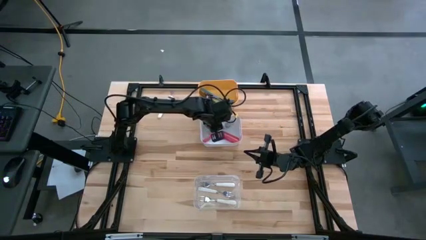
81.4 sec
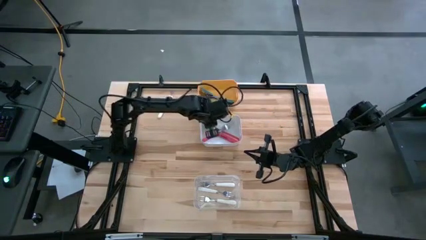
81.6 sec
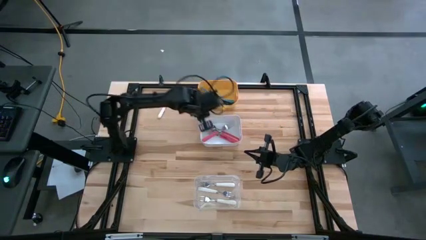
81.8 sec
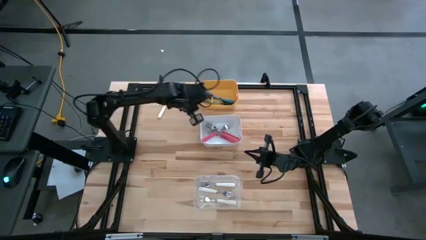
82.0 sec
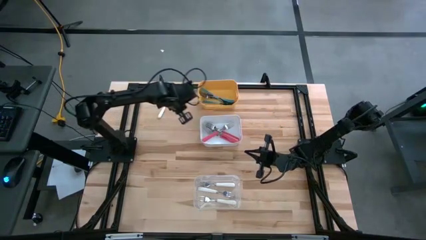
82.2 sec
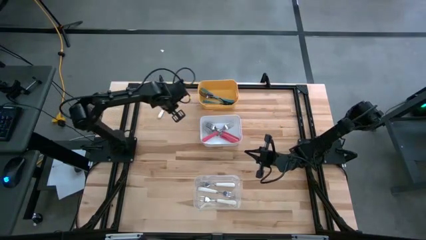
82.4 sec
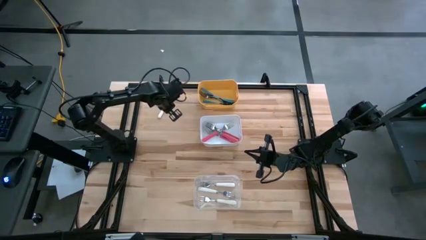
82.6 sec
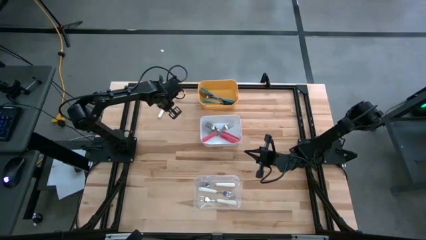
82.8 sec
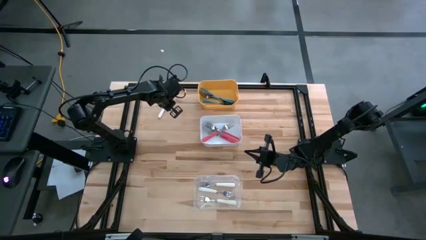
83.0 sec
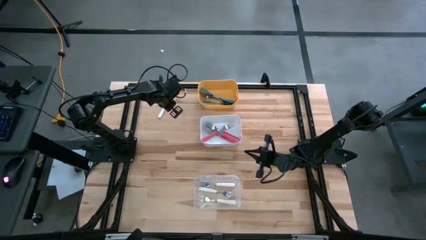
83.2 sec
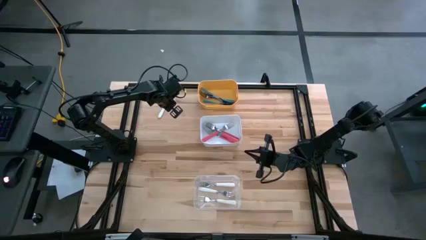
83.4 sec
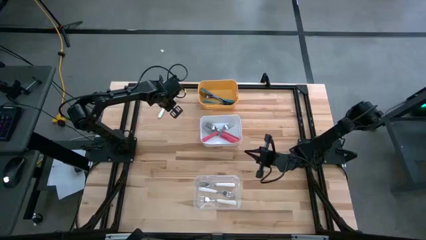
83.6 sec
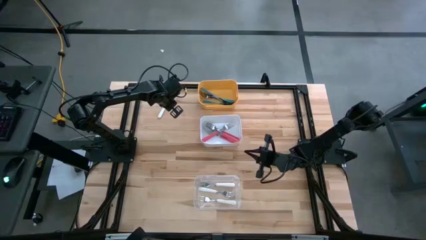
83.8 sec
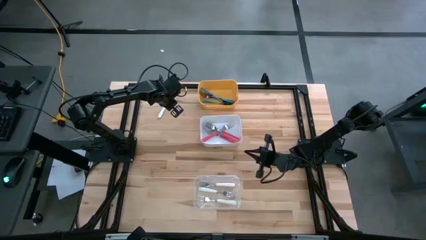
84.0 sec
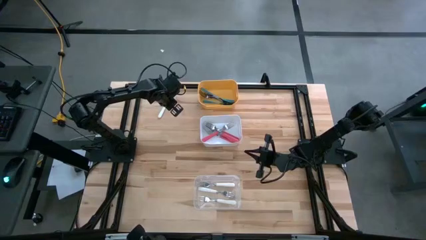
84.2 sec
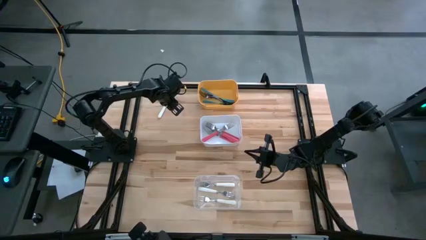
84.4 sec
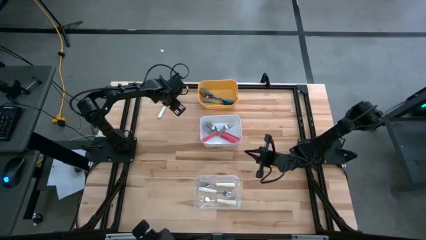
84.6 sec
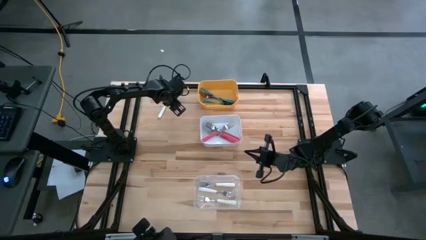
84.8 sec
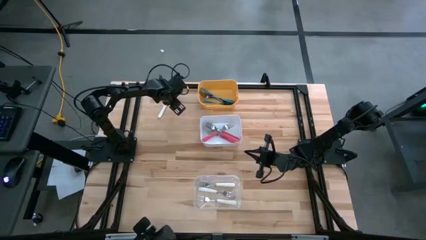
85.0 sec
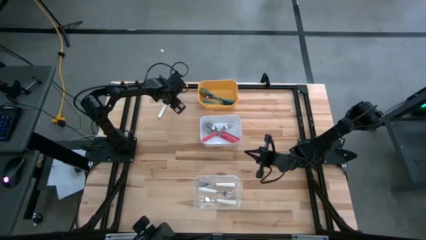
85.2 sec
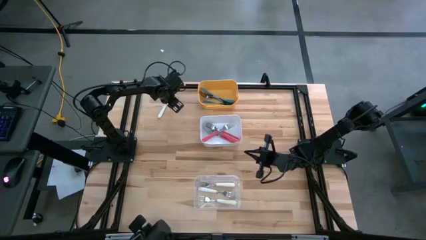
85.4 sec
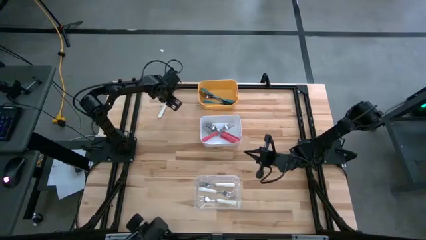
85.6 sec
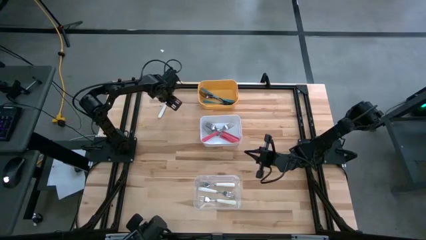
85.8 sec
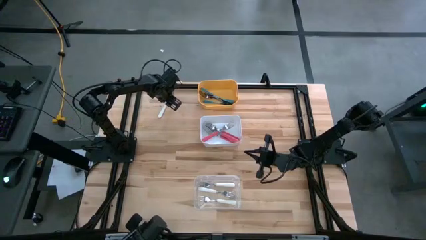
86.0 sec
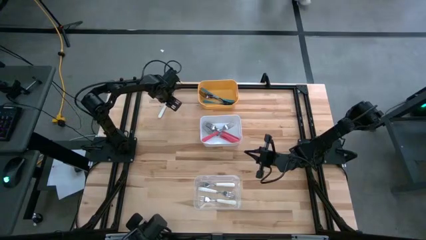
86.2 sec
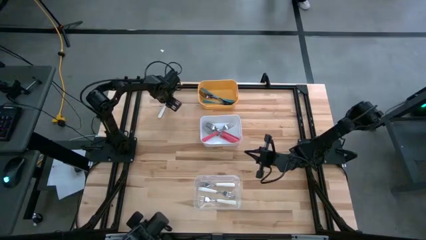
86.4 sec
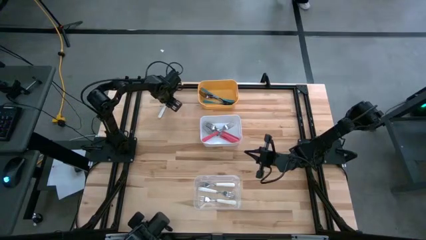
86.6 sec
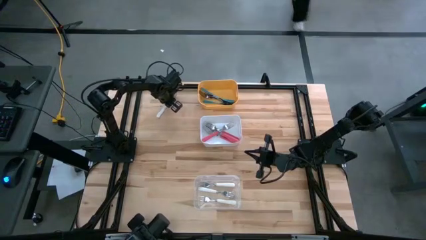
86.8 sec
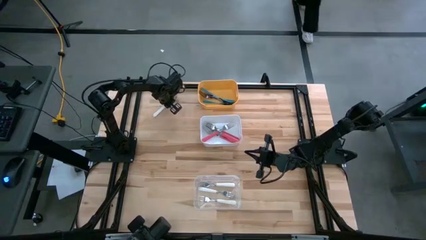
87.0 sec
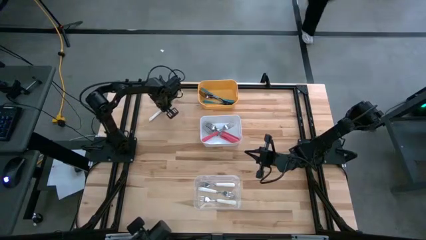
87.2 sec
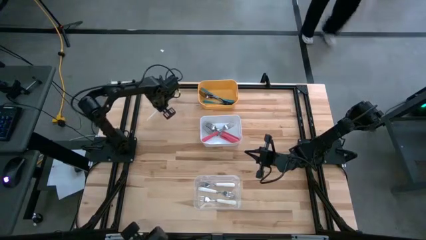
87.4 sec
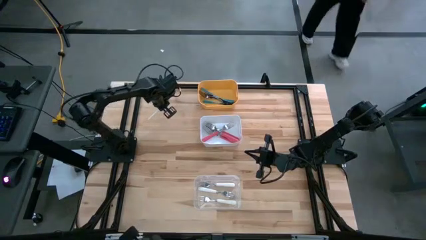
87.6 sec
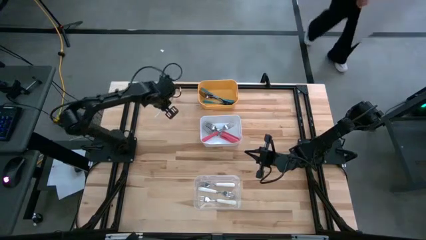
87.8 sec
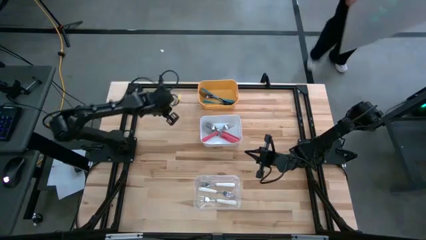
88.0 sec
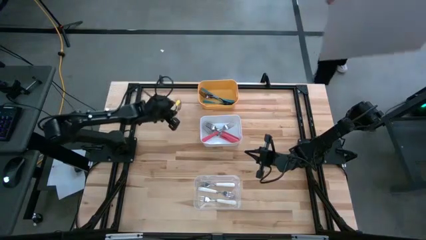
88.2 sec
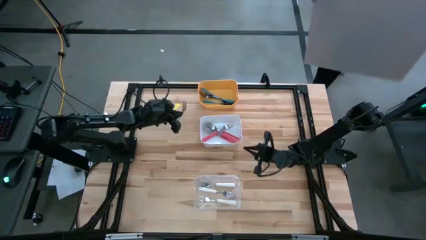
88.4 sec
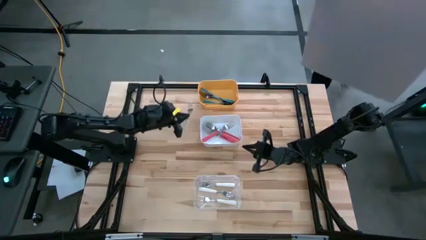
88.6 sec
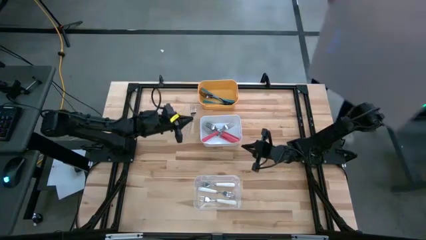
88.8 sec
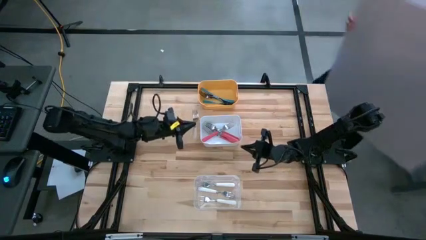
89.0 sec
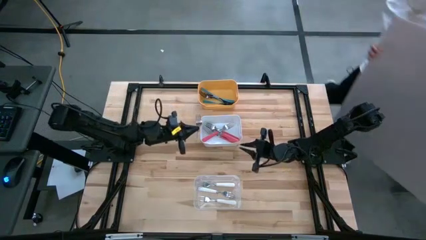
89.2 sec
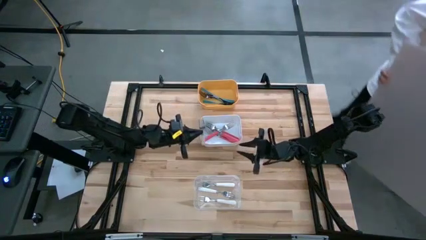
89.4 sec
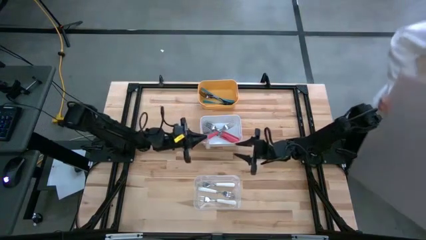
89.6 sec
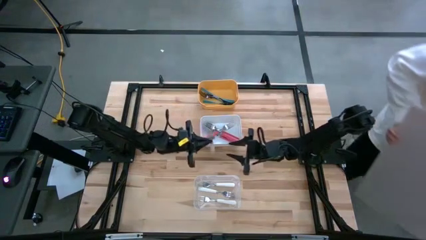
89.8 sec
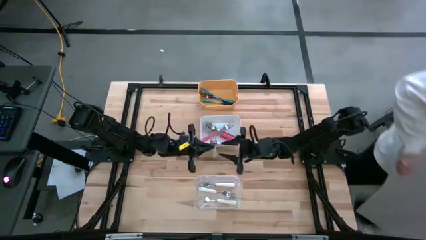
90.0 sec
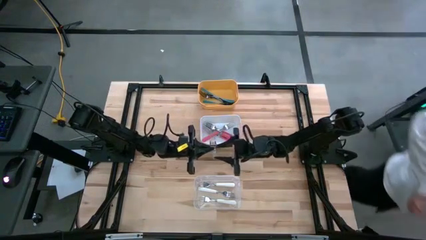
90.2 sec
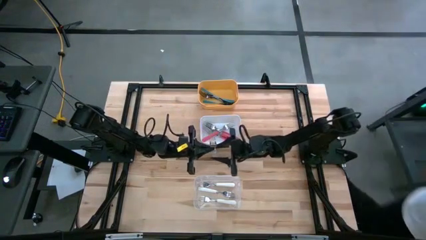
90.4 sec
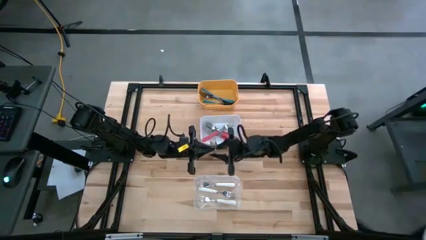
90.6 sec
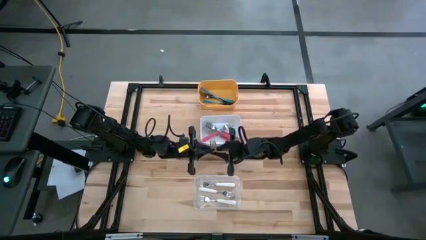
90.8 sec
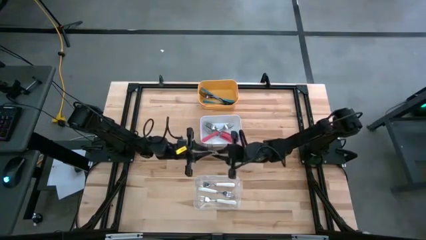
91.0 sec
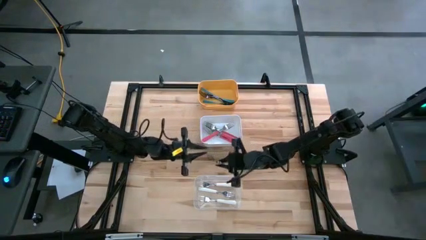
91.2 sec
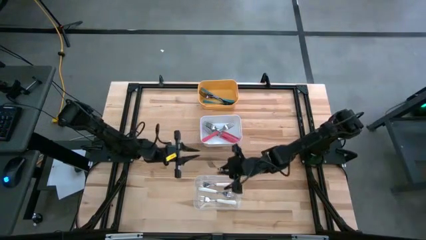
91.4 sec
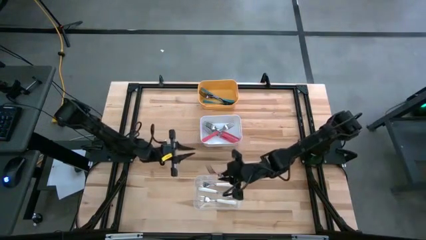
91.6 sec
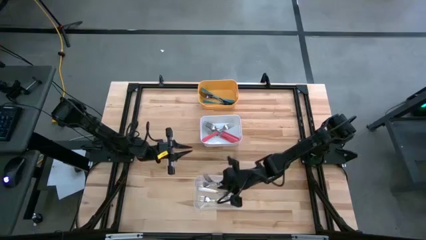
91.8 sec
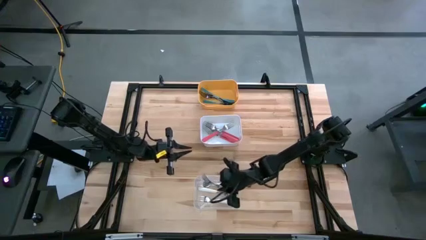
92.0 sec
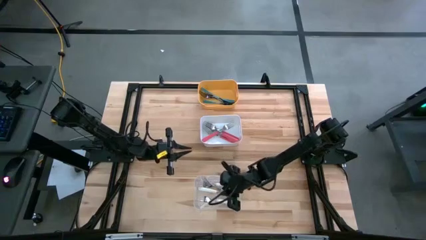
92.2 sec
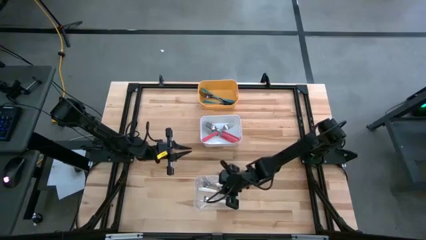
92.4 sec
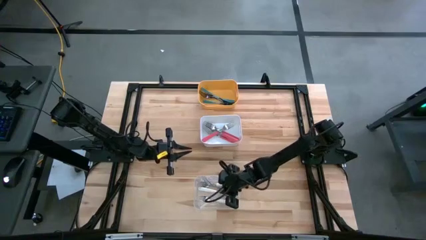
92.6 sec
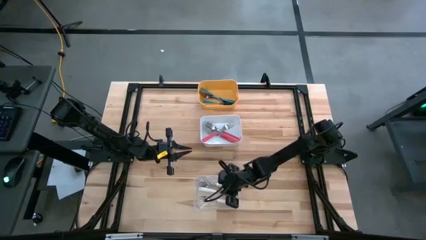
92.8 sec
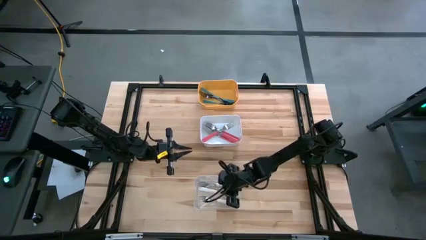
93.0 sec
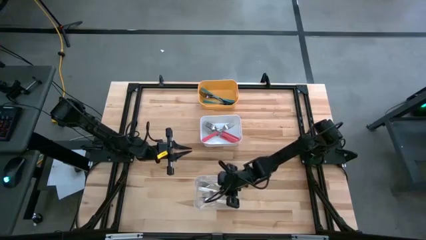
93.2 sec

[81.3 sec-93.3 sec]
Task: Sort silverware by color (type)
Put the white fork into the transparent bin

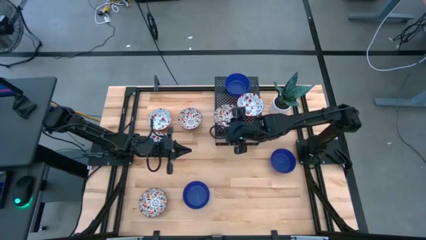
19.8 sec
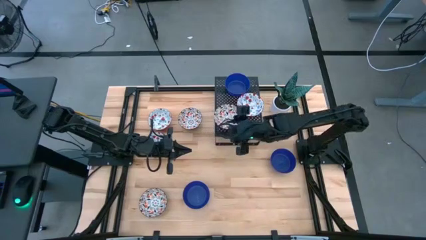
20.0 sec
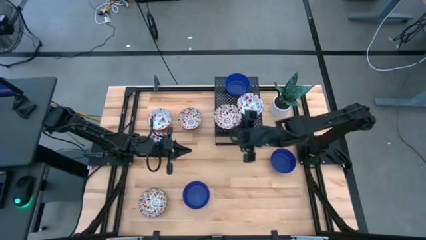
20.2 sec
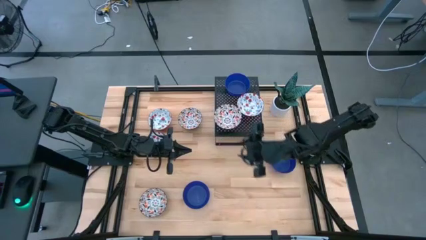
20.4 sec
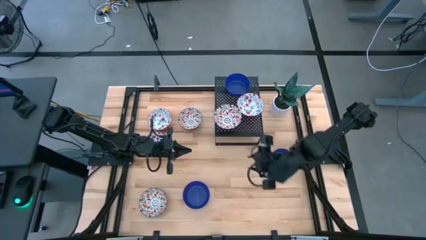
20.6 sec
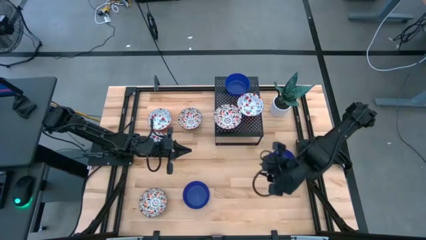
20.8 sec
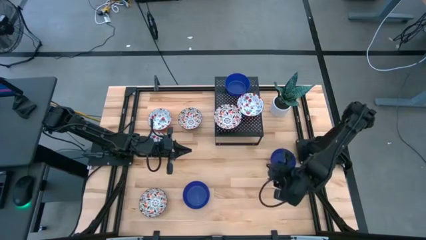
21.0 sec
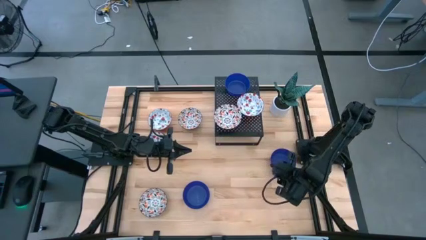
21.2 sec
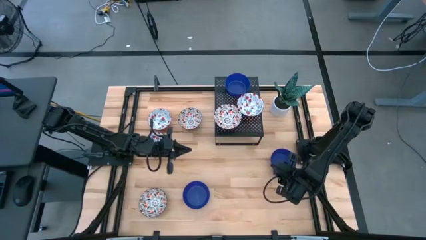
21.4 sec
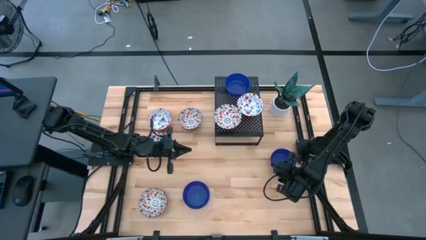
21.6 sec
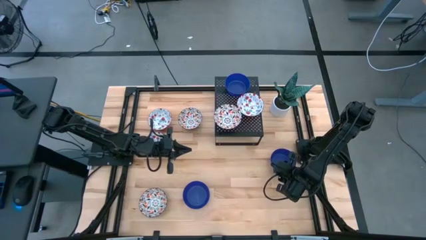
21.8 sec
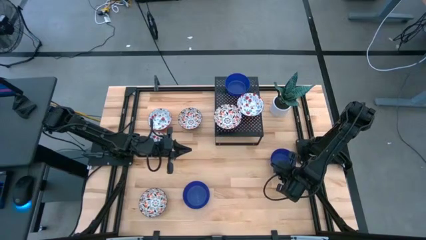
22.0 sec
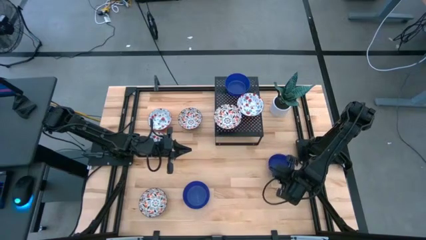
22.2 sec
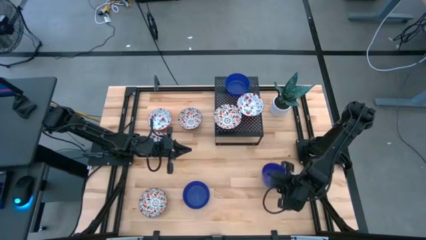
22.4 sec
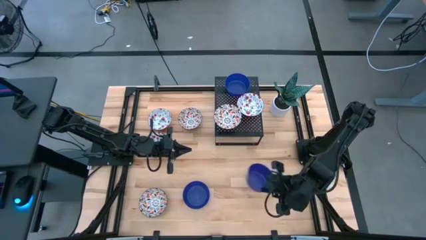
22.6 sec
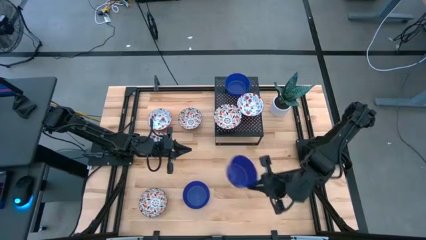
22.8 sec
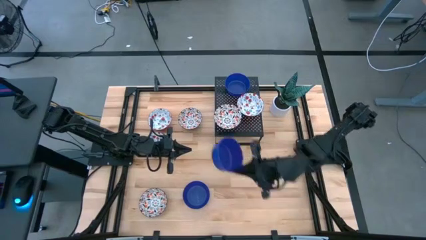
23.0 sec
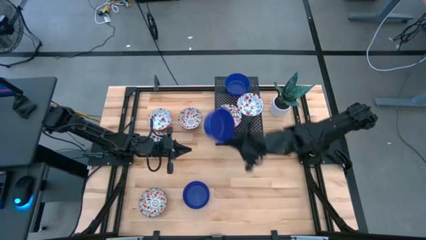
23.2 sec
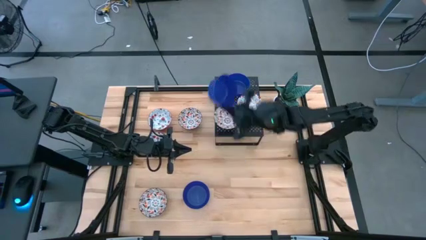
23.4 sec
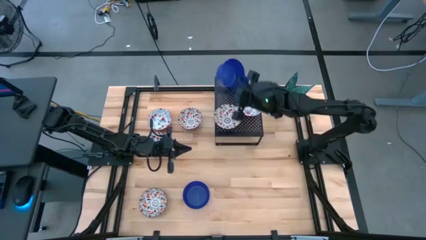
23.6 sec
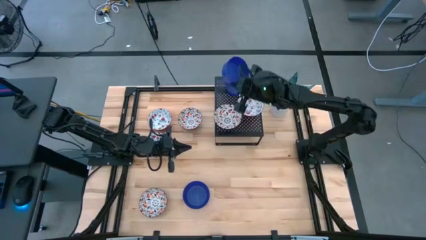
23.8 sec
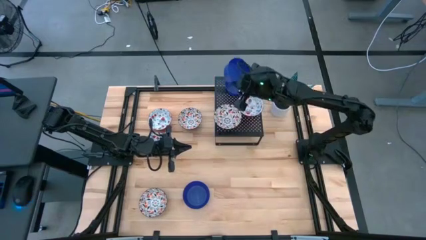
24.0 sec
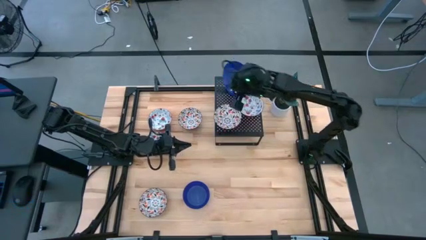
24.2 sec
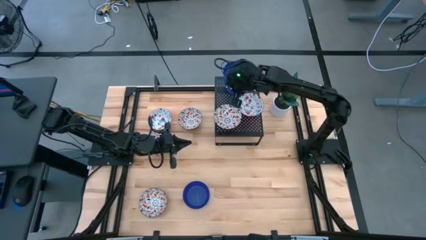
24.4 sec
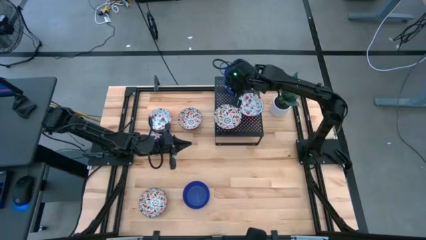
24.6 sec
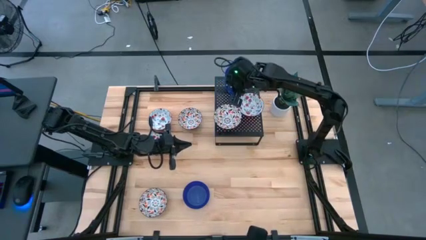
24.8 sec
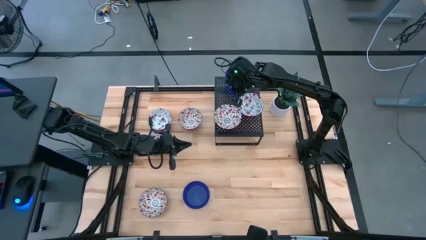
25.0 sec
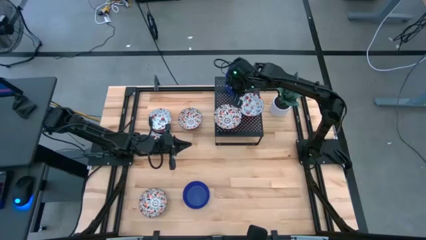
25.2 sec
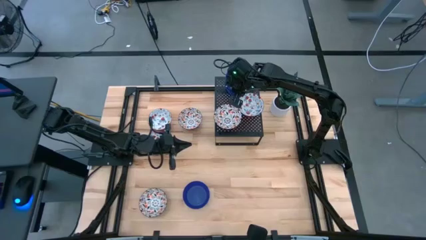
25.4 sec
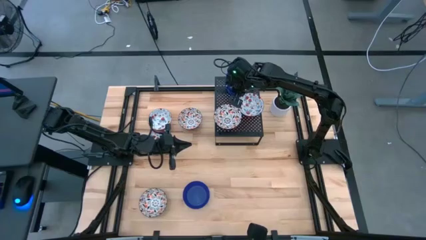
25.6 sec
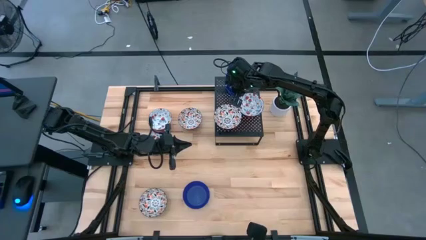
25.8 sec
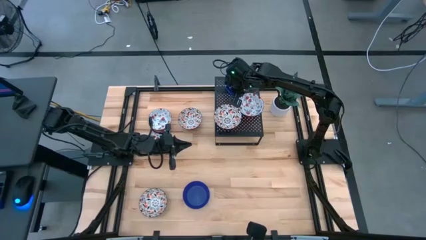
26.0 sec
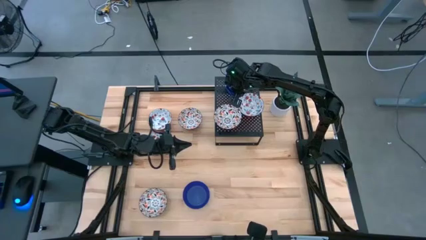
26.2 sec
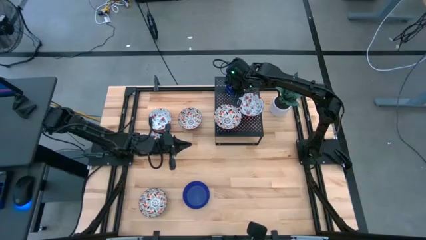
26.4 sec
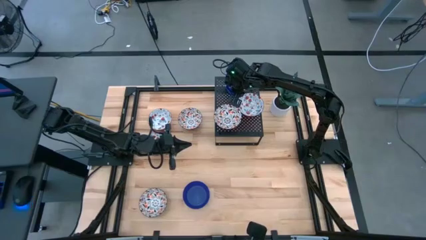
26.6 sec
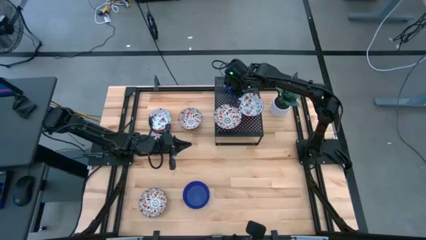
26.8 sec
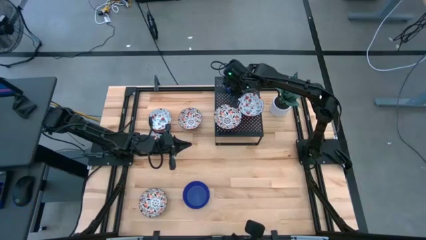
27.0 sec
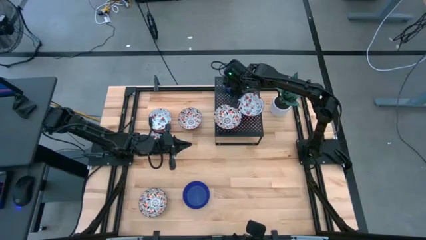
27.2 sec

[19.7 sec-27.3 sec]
Task: Pick & Place Mini bowls
Stack the top blue bowl on top of the blue bowl on the shelf
